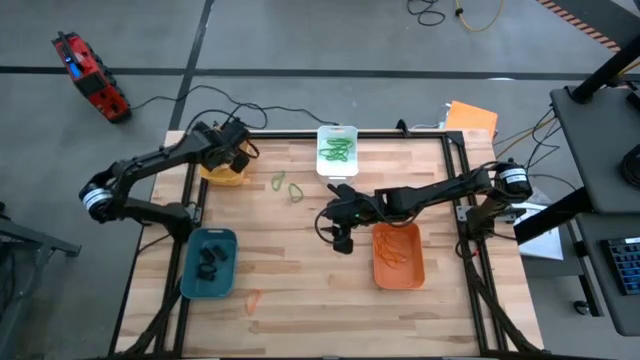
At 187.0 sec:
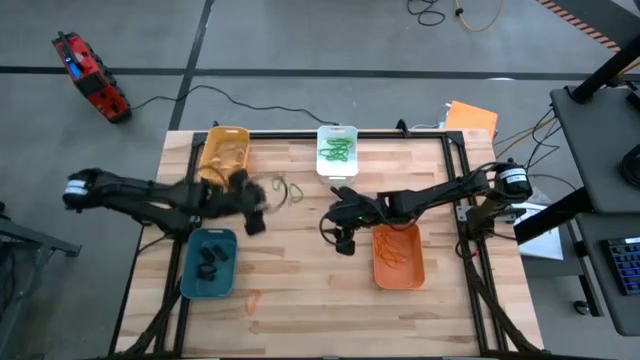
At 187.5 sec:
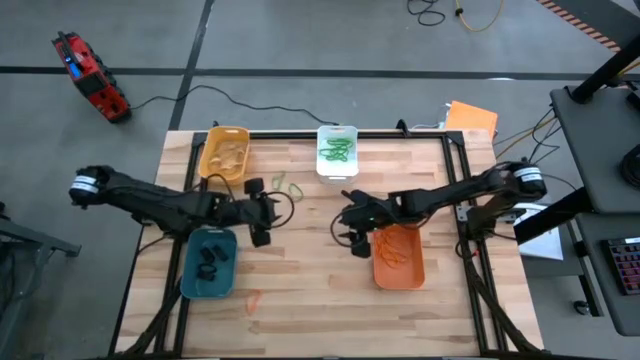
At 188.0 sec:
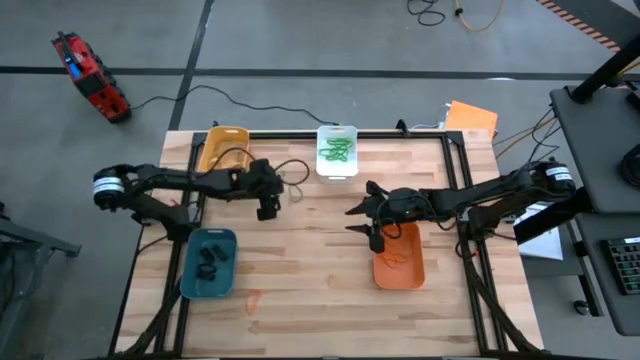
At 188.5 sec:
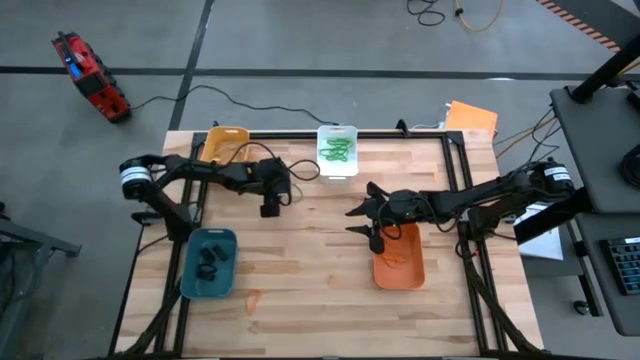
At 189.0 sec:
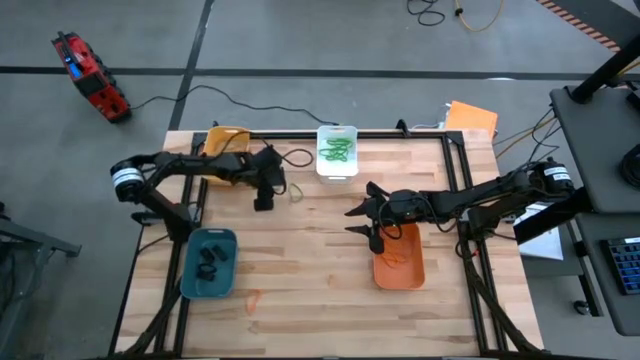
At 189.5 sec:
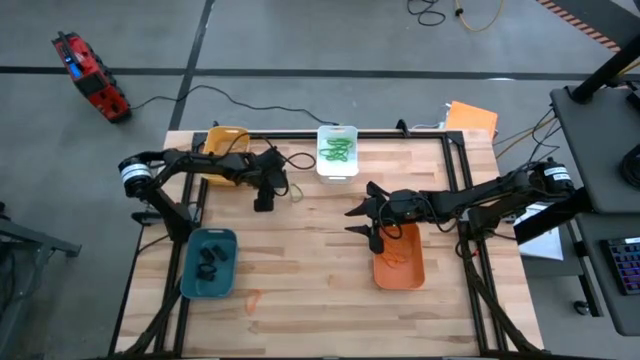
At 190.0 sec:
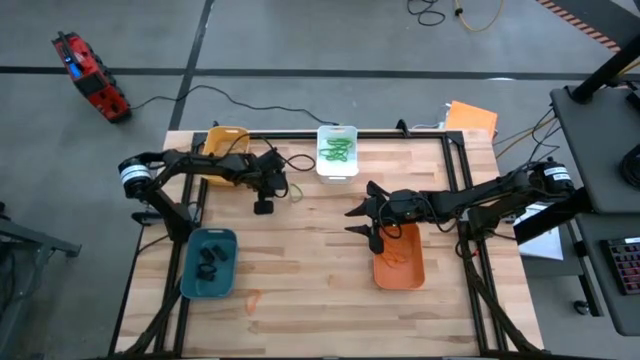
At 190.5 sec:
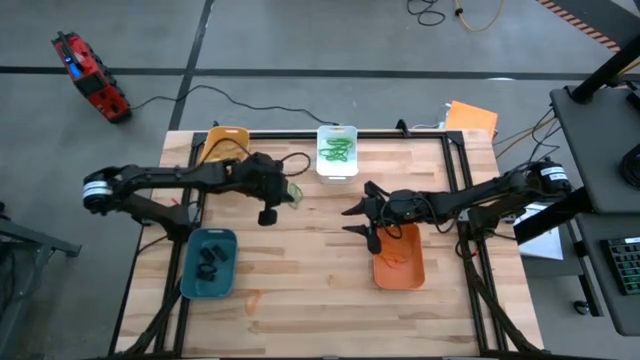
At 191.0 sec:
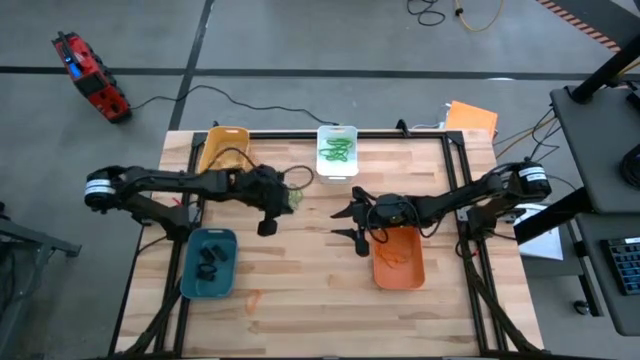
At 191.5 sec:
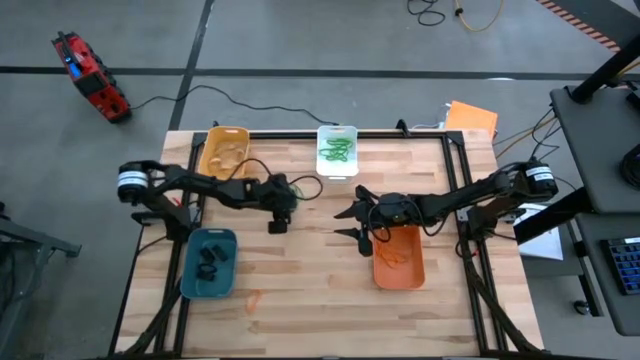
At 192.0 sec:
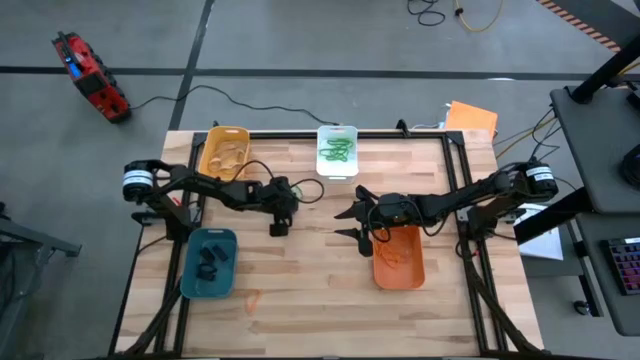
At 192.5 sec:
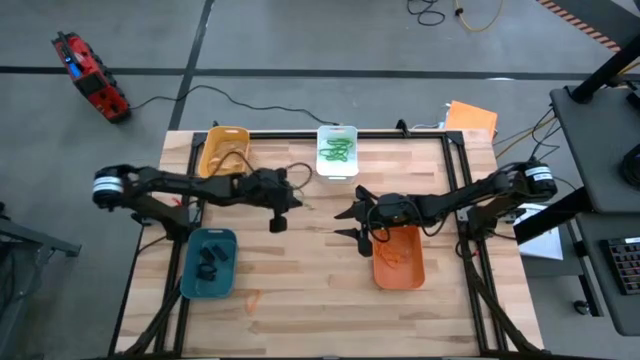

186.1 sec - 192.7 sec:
Task: Sort rubber bands into baskets
Put the green rubber band into the white bin

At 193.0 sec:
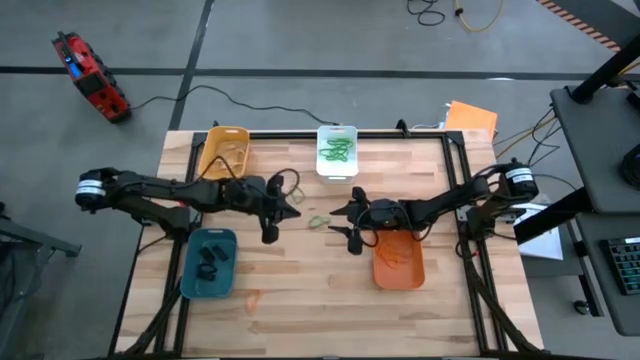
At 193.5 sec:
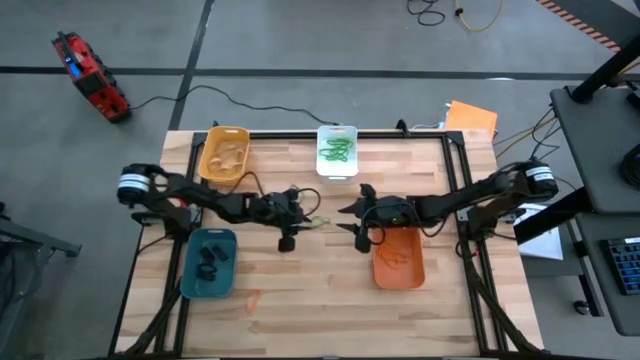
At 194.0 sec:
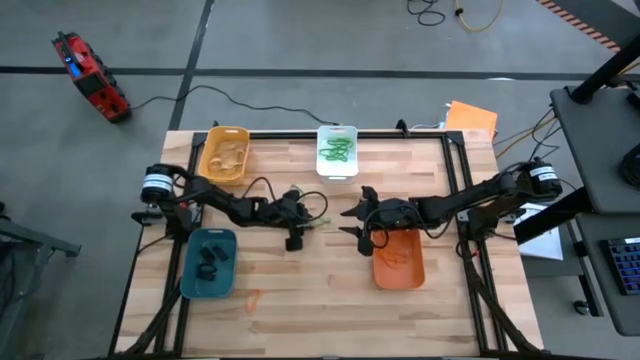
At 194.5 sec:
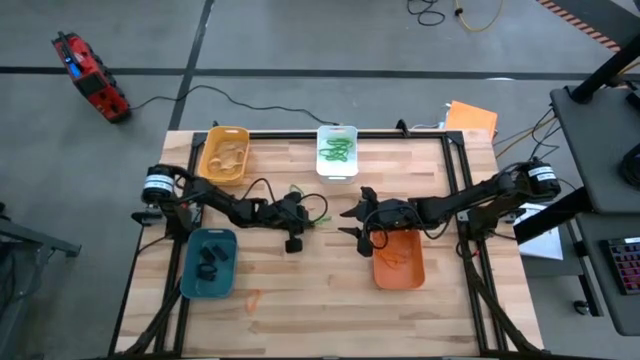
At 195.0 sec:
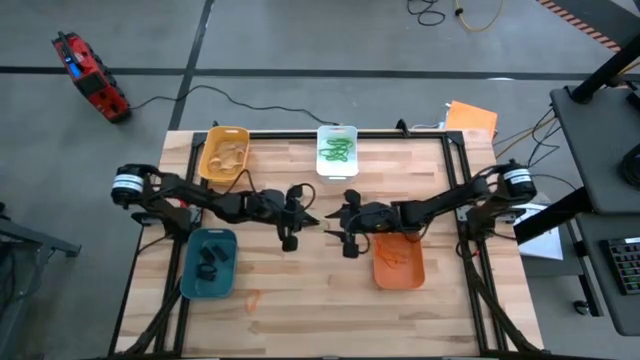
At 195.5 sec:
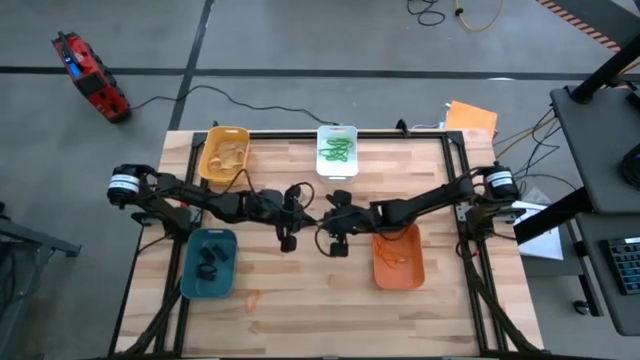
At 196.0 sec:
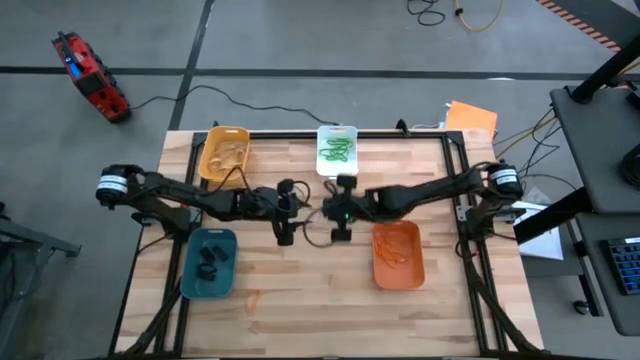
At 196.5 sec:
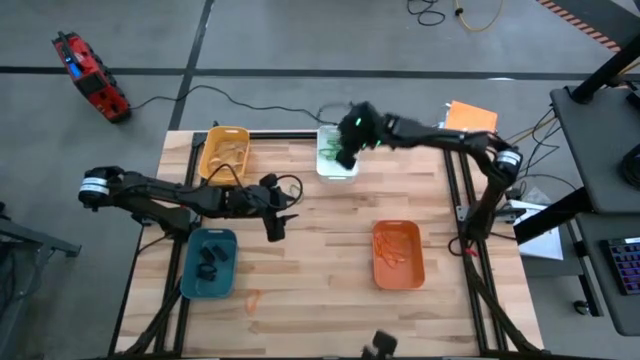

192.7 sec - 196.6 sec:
Put the green rubber band into the white bin

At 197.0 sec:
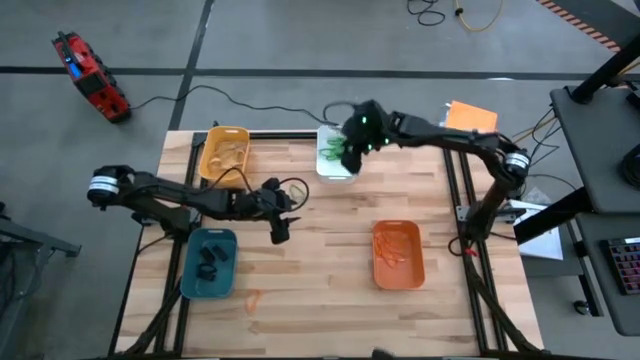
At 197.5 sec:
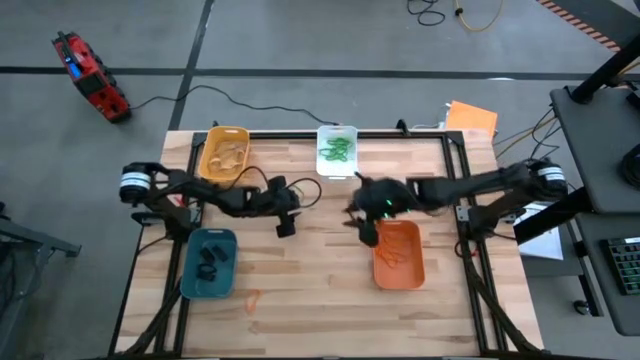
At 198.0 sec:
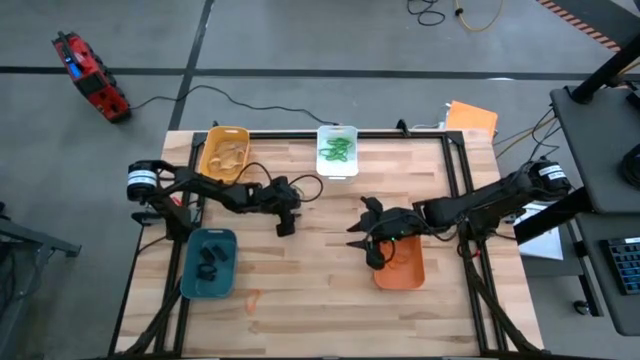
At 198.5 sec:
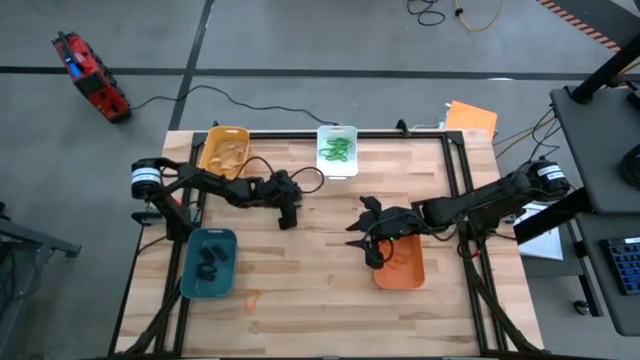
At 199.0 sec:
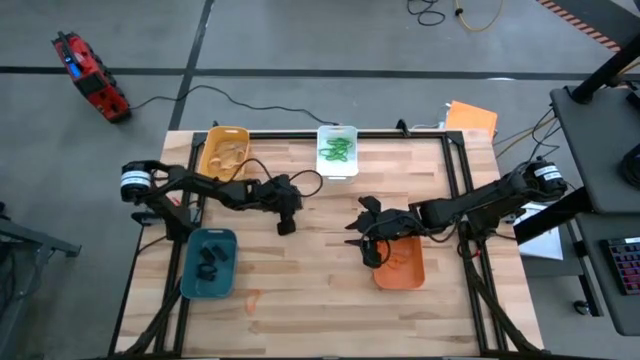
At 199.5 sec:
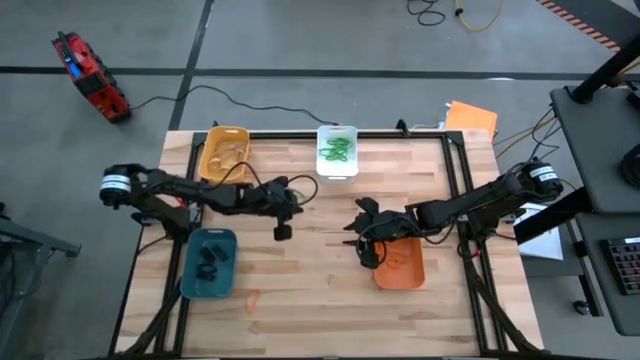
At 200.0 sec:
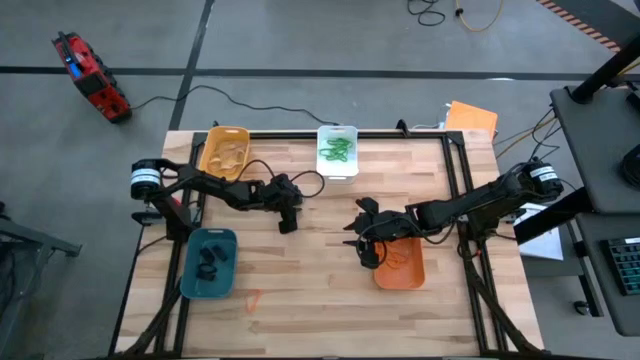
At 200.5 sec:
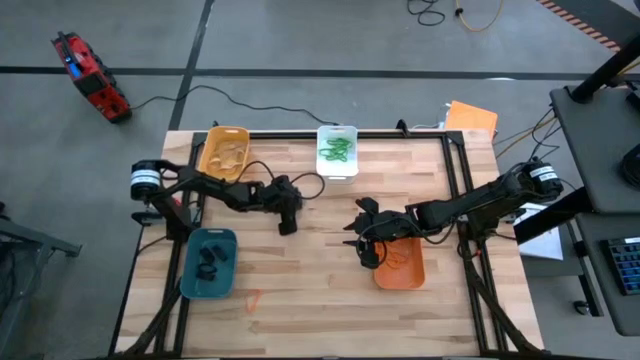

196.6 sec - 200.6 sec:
Put the green rubber band into the white bin

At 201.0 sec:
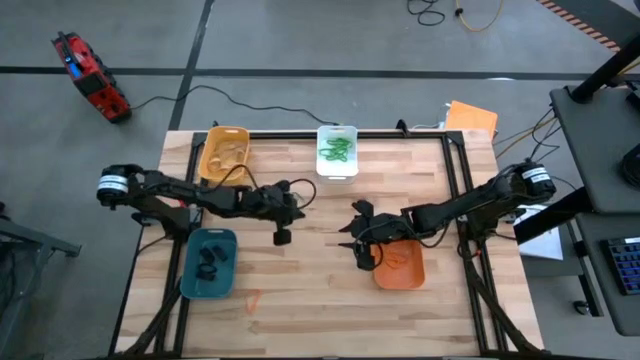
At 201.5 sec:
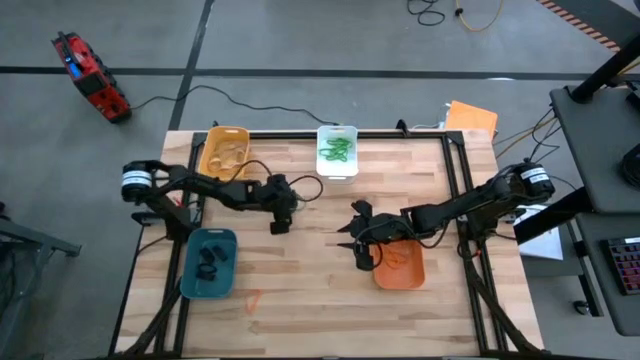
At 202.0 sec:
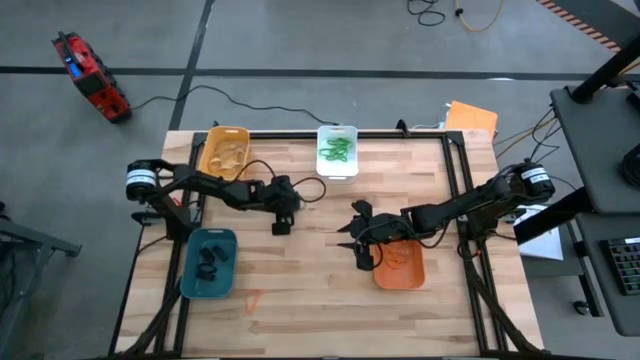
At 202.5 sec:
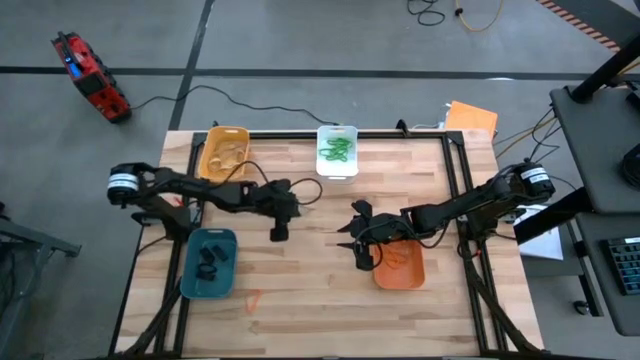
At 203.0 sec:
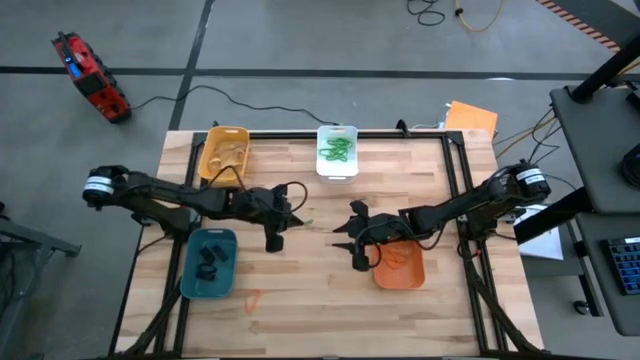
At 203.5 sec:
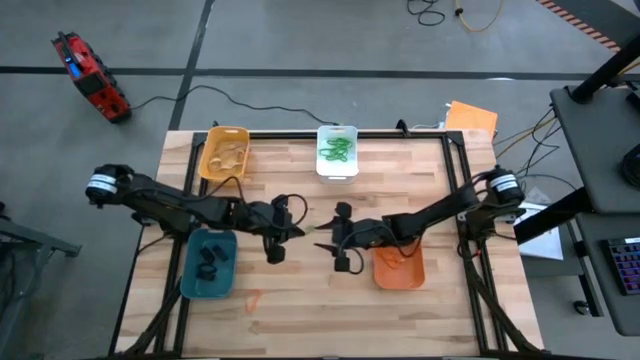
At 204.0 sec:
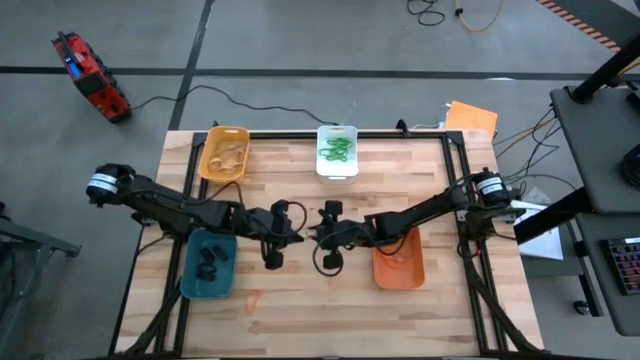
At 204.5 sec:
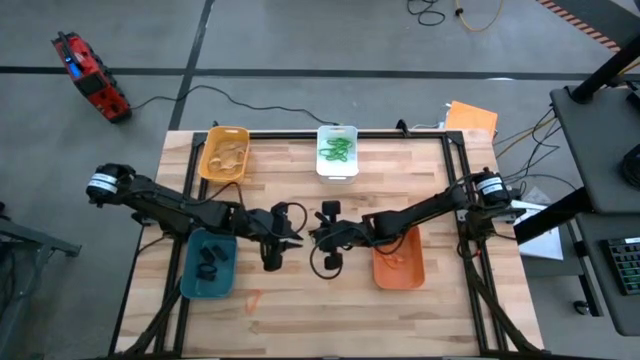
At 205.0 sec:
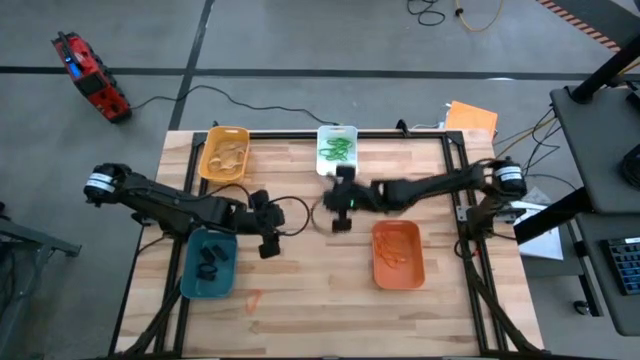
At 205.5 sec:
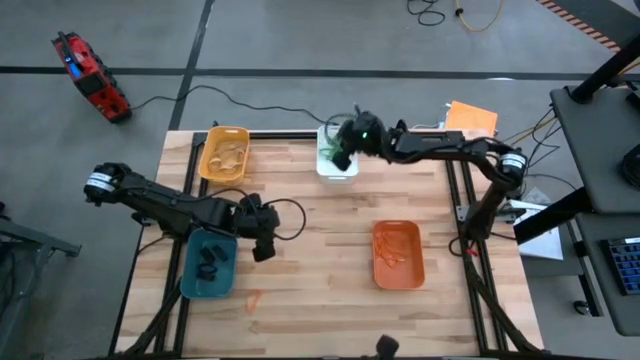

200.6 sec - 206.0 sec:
Put the green rubber band into the white bin

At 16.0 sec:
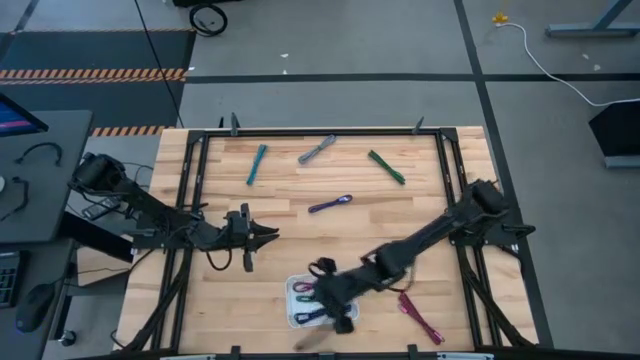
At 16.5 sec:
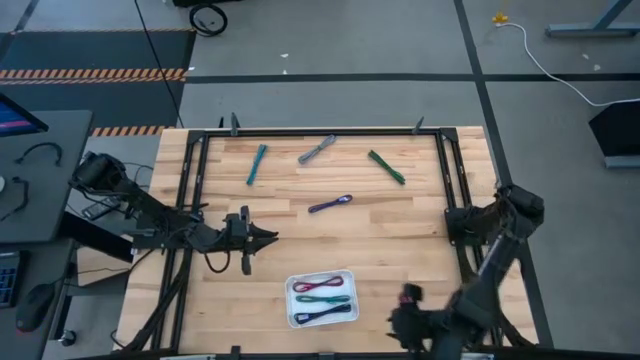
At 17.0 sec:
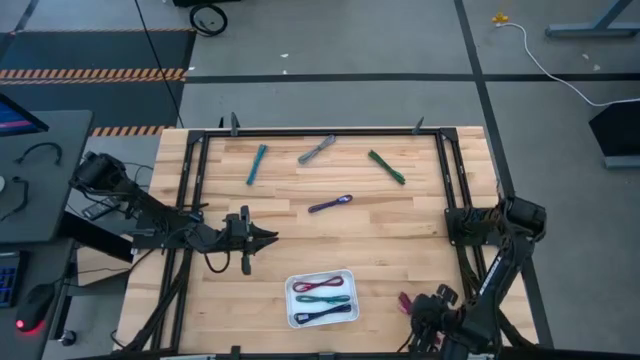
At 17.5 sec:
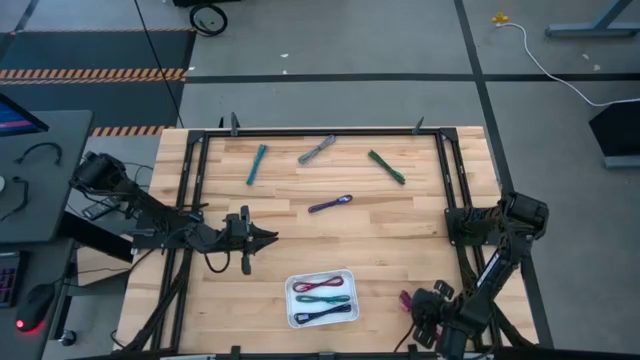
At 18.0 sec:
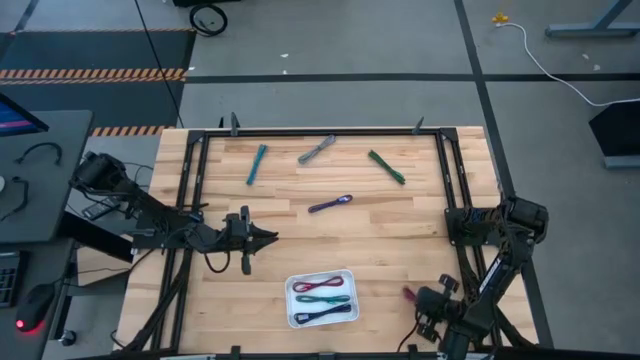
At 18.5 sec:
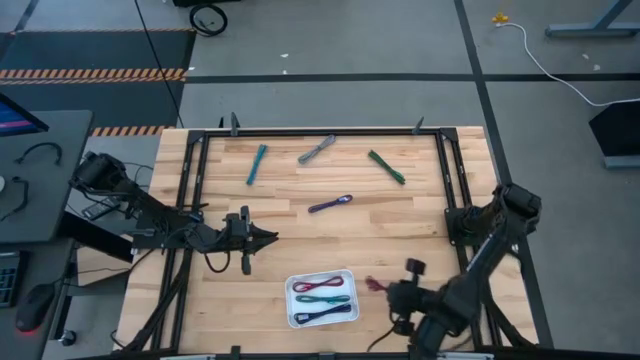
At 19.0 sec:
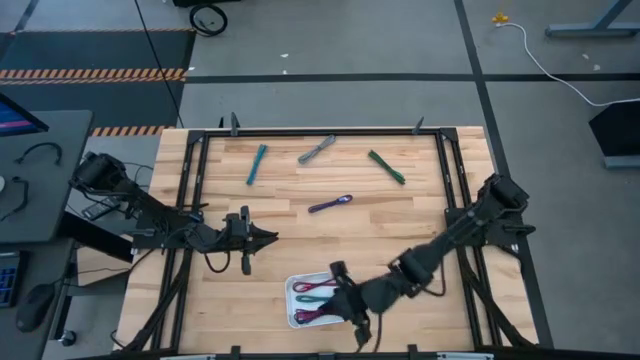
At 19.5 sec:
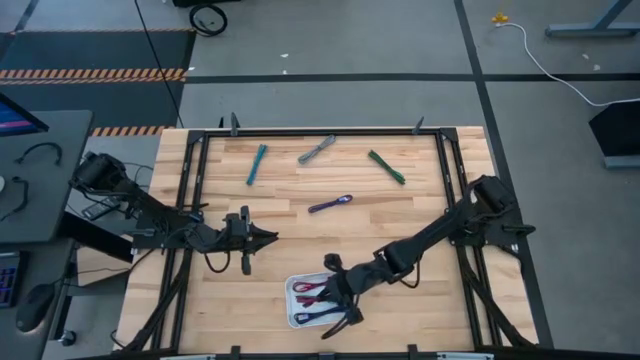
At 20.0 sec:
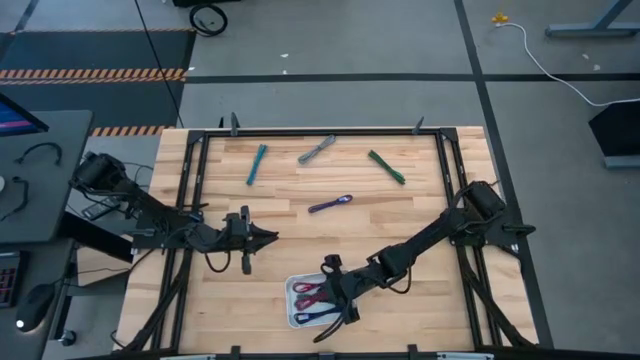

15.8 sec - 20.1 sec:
Task: Pick and place USB-C Cables
Put the pink USB cable into the white bin
